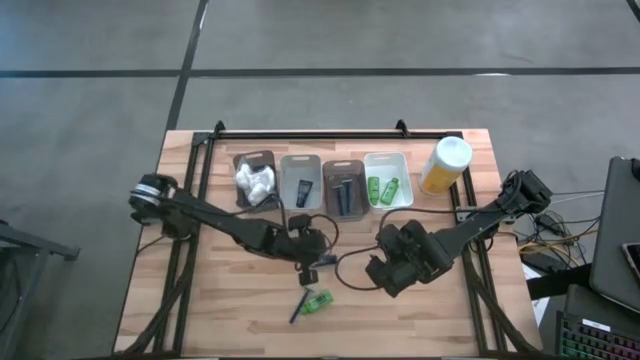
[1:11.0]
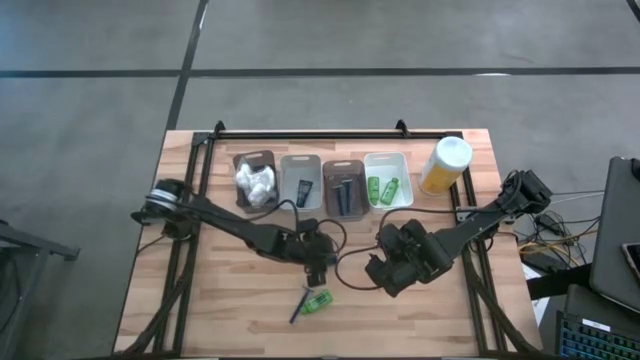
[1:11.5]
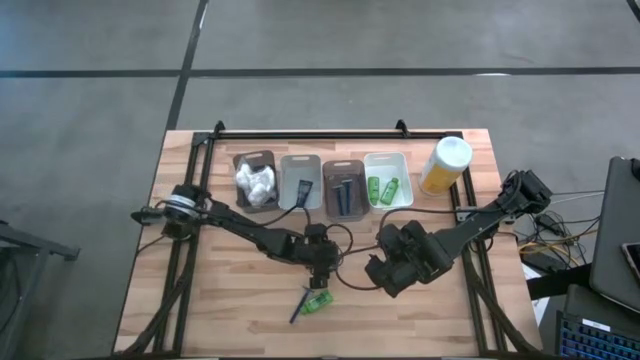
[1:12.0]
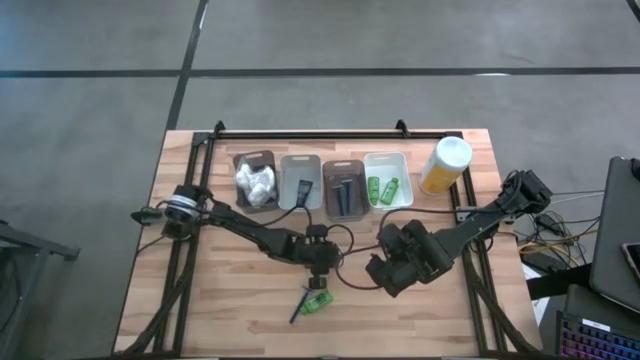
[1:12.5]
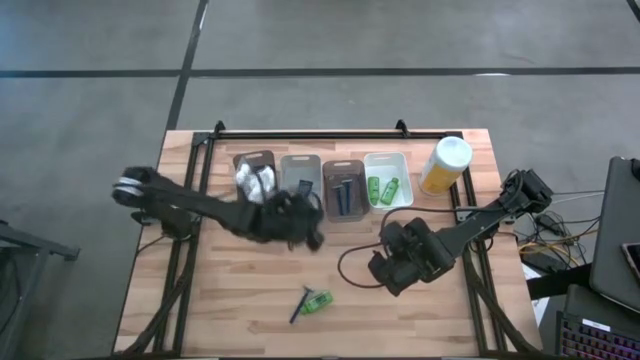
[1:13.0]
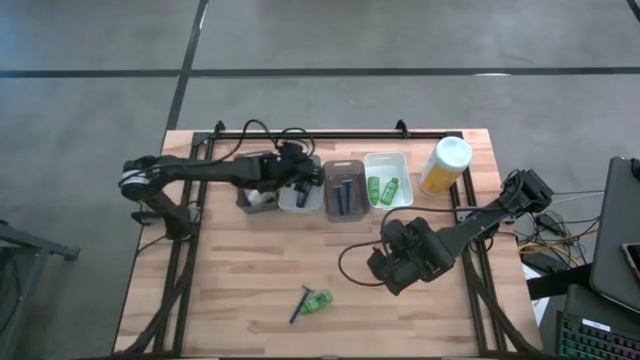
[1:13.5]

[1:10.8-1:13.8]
Task: Pick & Place Travel size toiletries
Put the blue shave cream into the gray bin

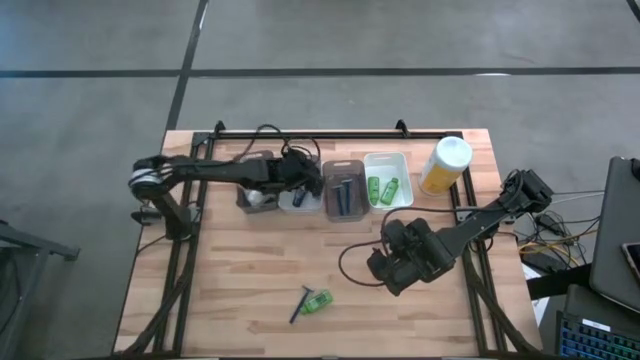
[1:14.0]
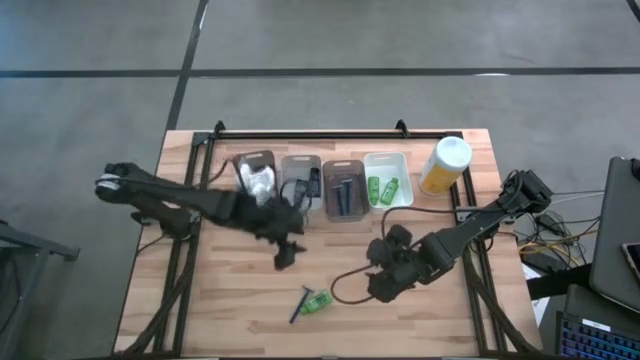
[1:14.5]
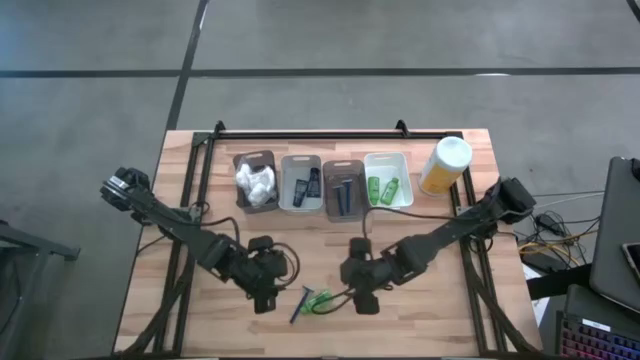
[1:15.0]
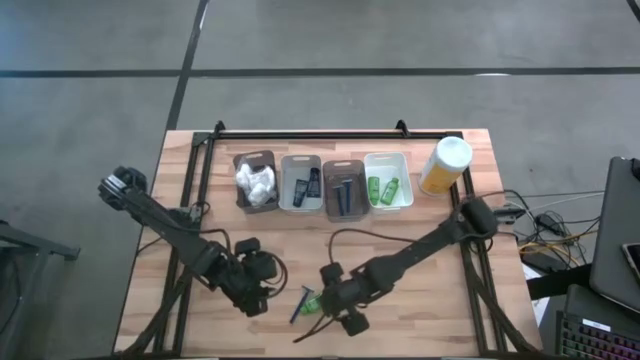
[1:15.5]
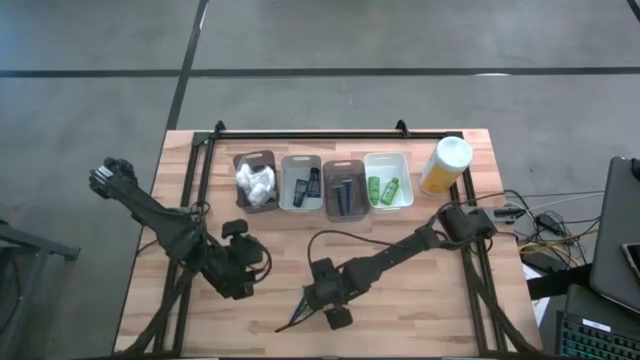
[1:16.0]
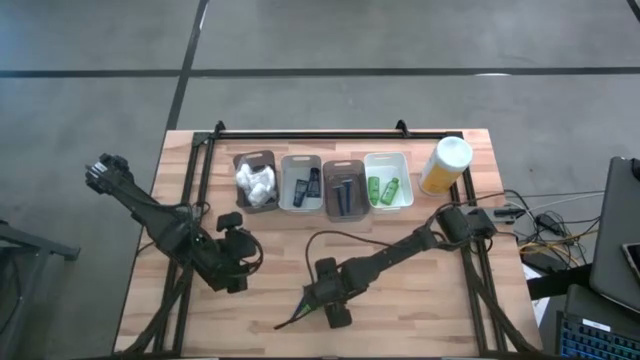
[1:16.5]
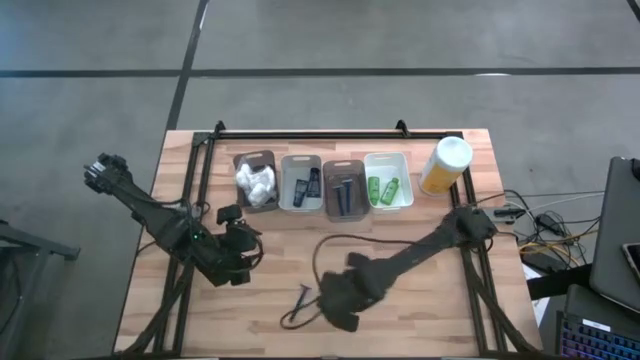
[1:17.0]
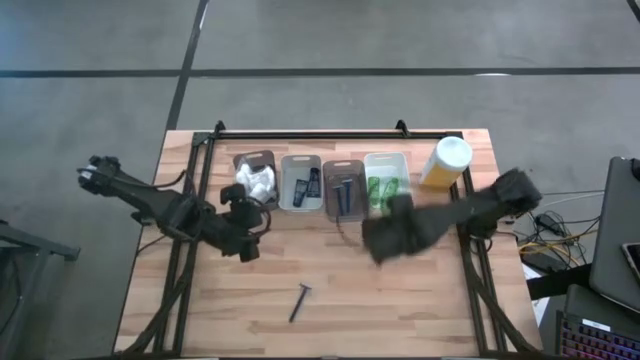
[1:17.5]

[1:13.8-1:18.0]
Put the green shampoo into the white bin

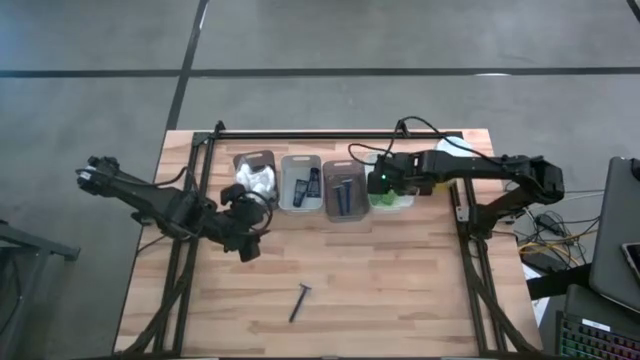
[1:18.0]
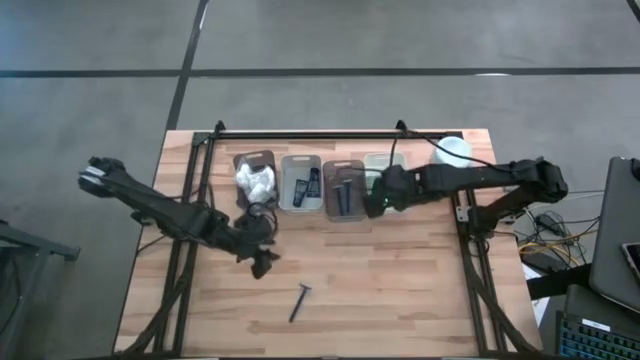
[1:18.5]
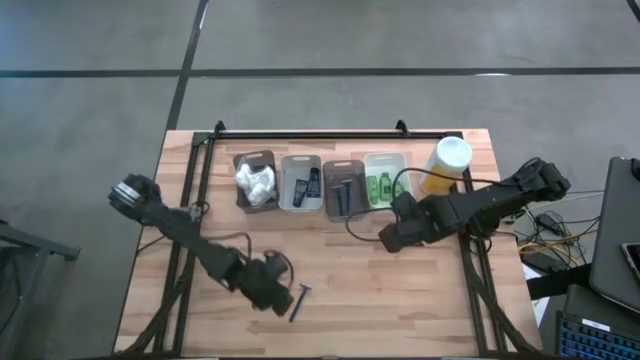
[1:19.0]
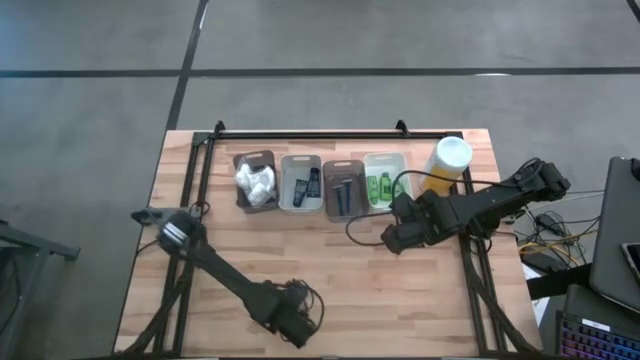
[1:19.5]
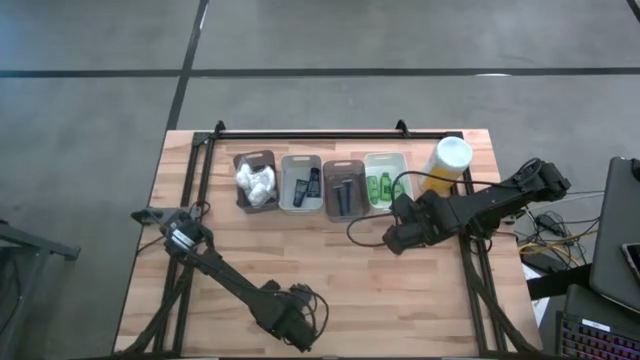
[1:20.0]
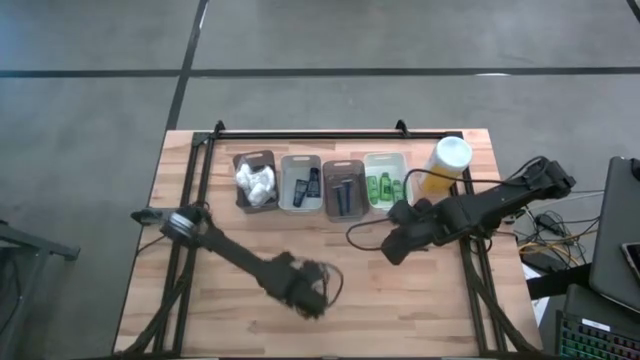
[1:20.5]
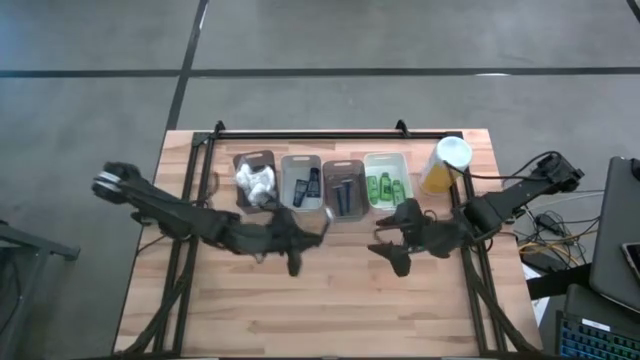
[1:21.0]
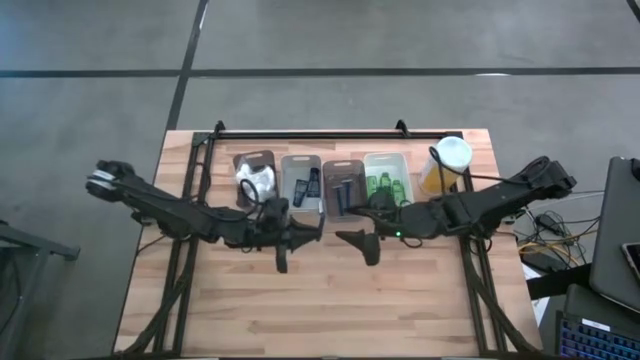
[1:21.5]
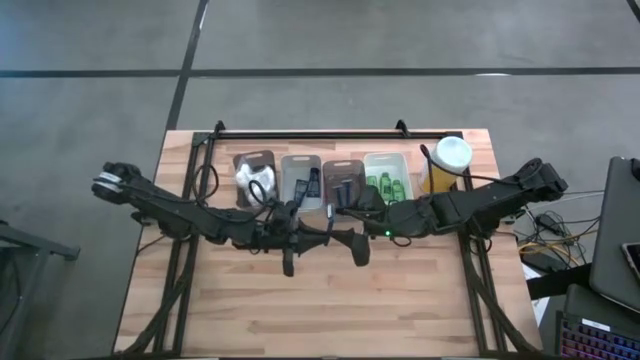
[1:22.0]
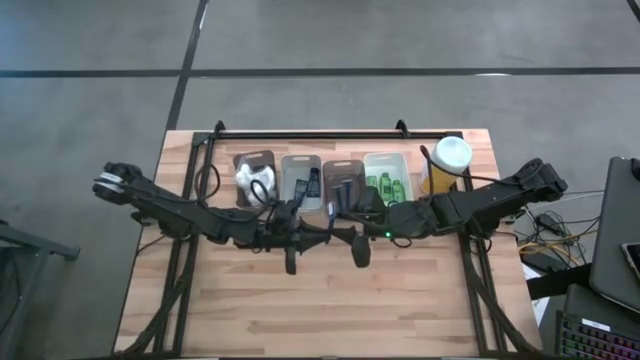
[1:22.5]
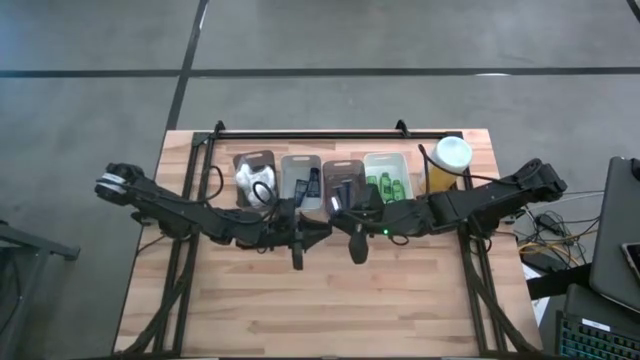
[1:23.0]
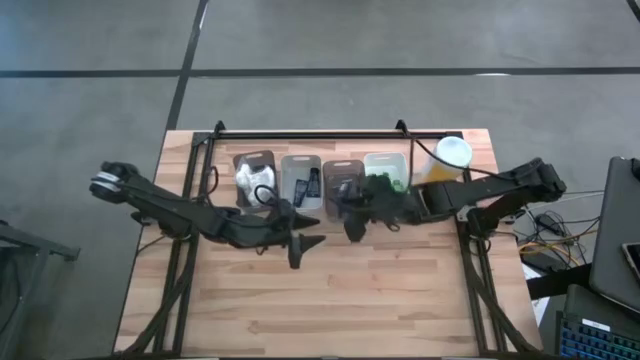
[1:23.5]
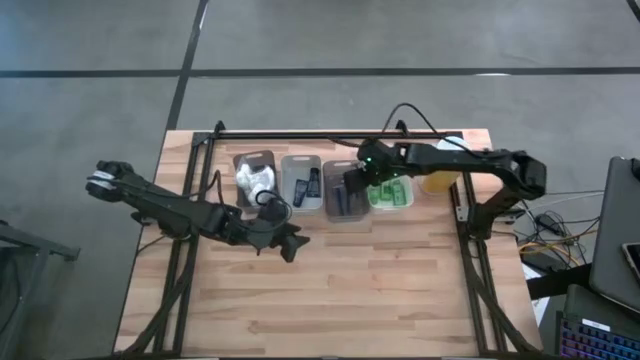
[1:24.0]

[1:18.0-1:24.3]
Put the blue razor into the right black bin

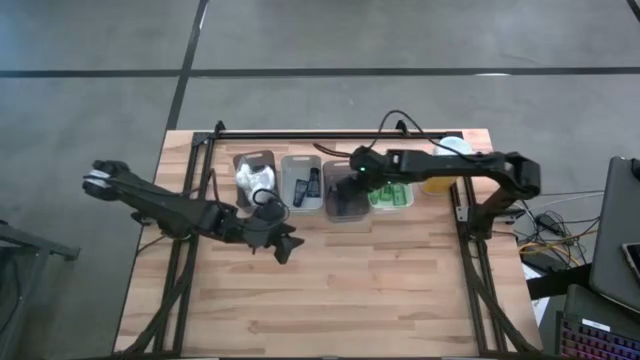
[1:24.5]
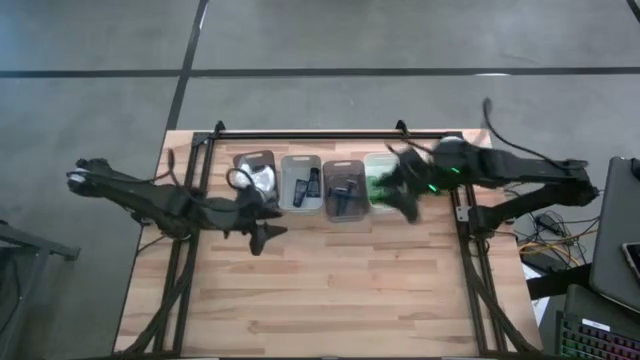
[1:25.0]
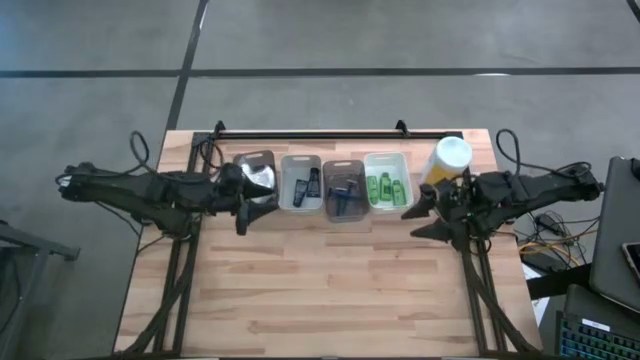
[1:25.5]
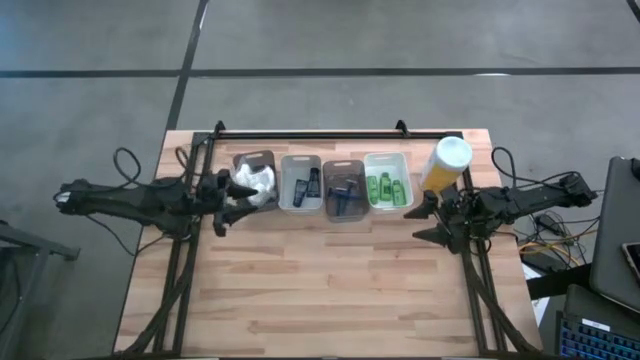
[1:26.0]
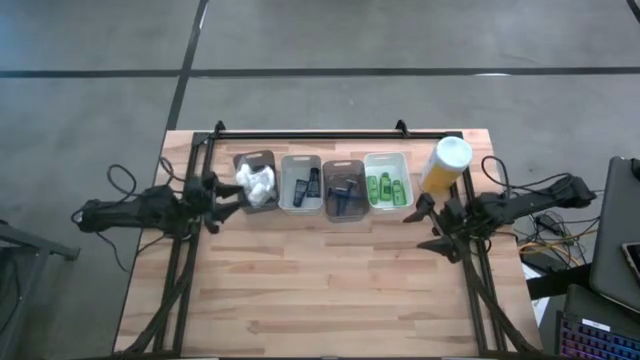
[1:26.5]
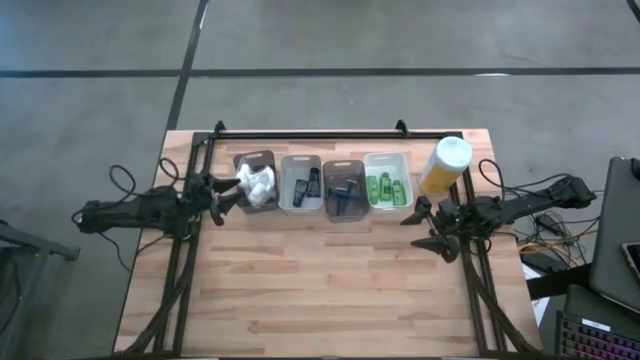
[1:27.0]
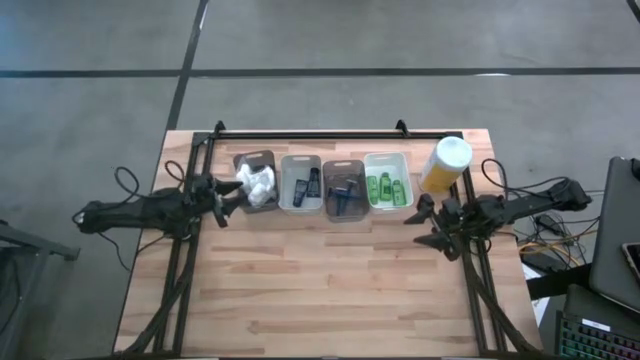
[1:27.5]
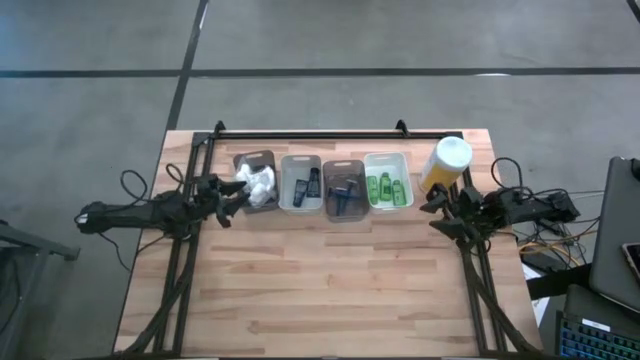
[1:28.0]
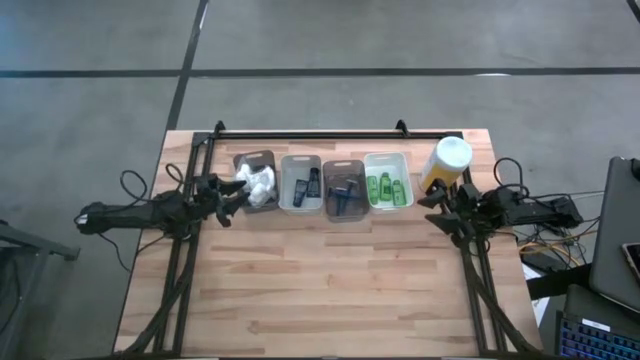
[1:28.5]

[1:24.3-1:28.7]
Return to Home Position

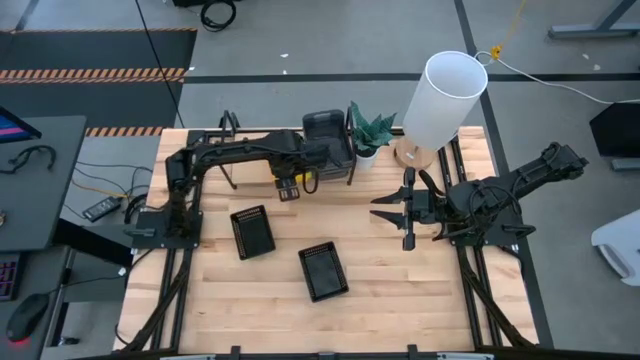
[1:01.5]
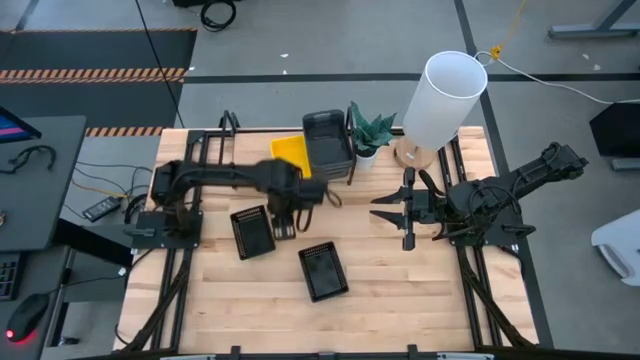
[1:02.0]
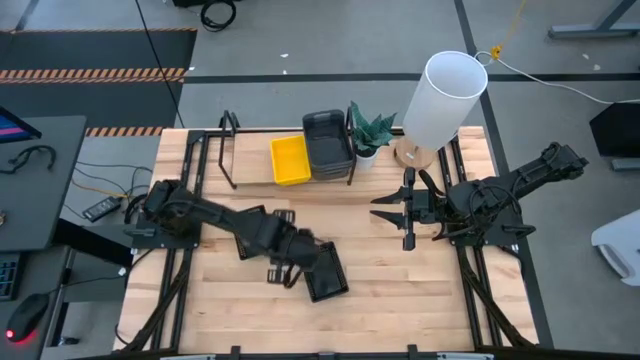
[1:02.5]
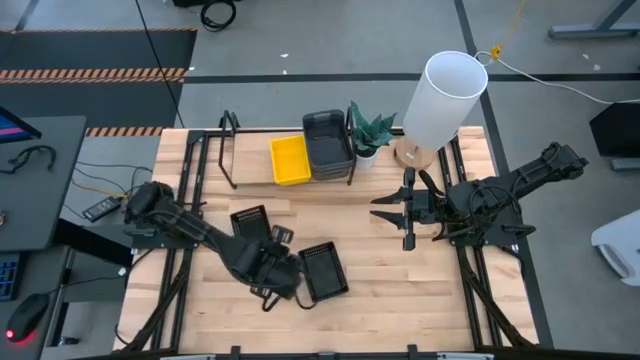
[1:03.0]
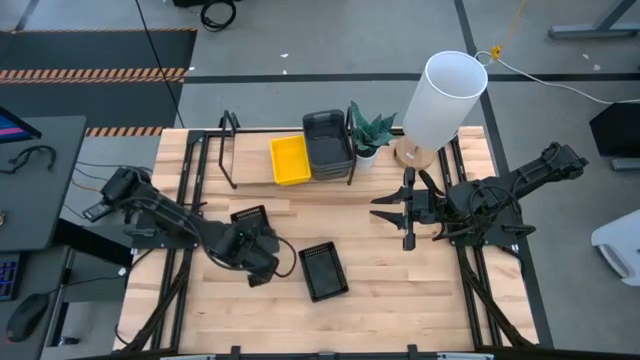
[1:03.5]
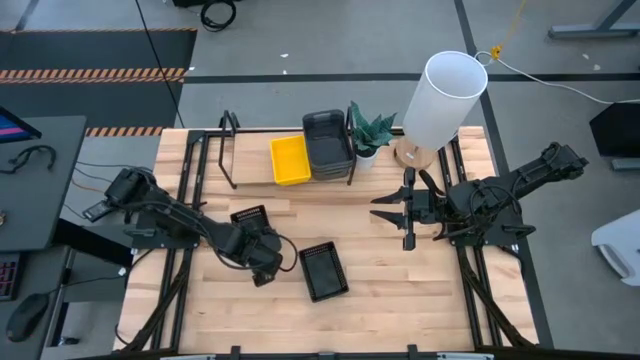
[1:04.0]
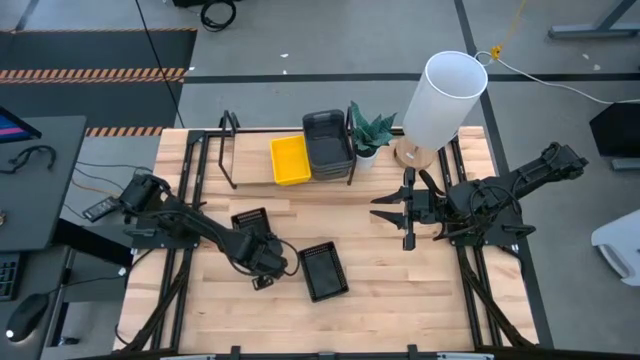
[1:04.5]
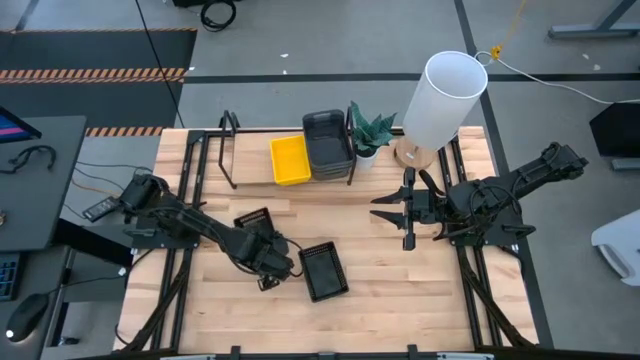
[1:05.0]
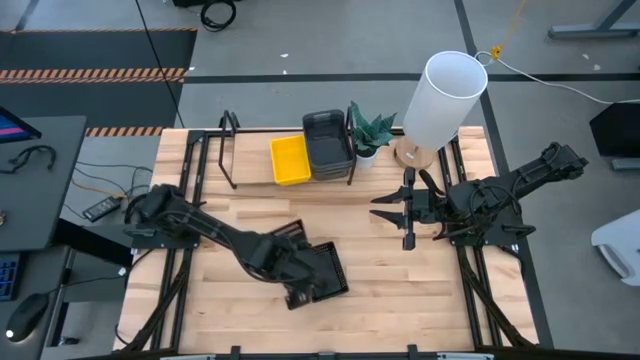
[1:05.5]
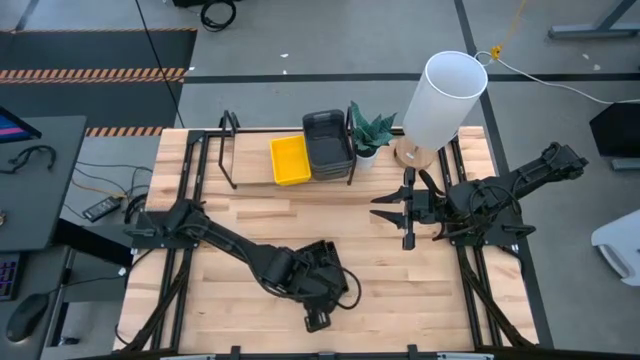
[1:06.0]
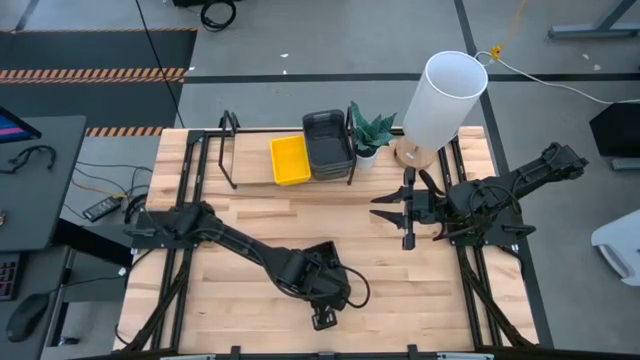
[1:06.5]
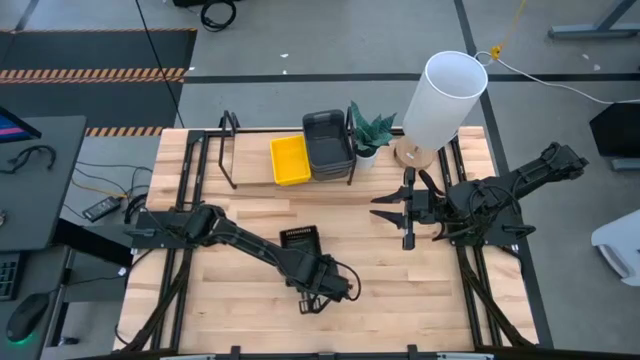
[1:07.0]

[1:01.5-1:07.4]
Task: Stack baskets on shelf by color
Stack the top black bin on top of the bottom black bins
